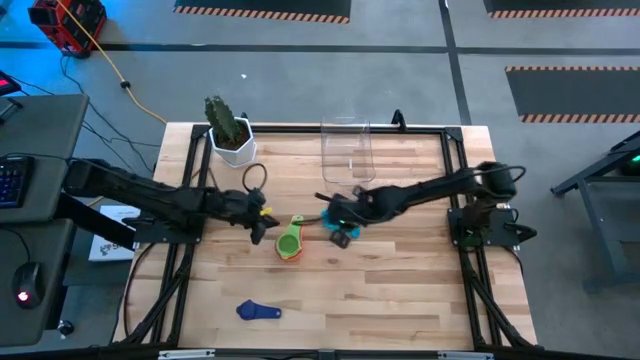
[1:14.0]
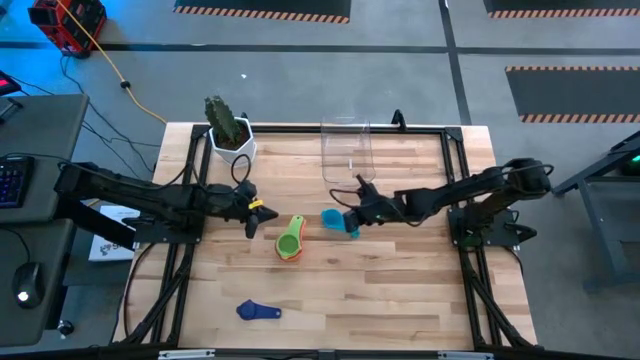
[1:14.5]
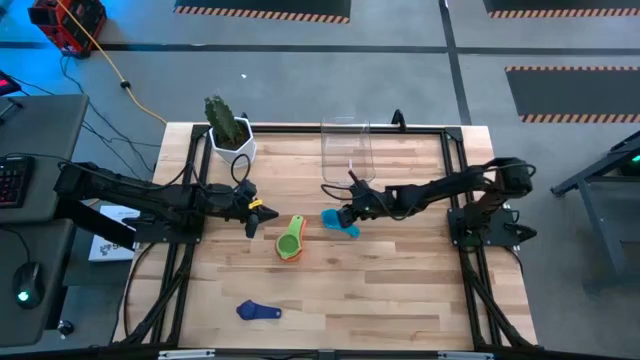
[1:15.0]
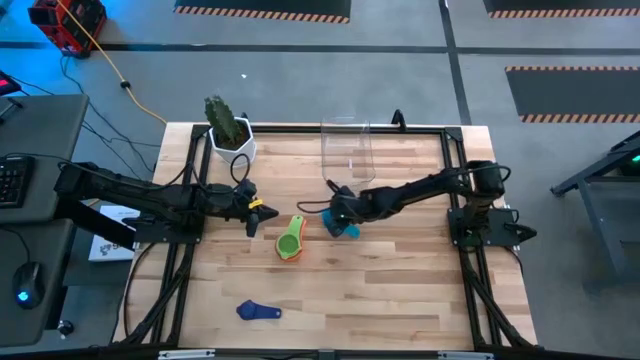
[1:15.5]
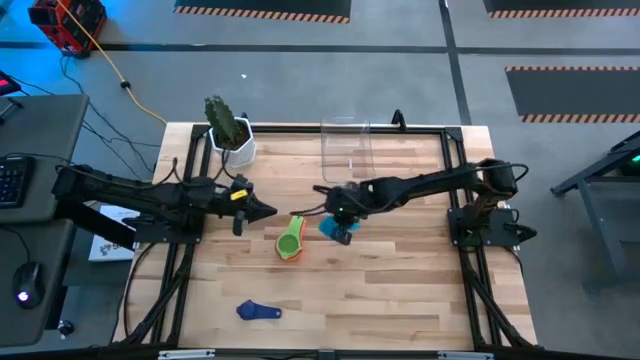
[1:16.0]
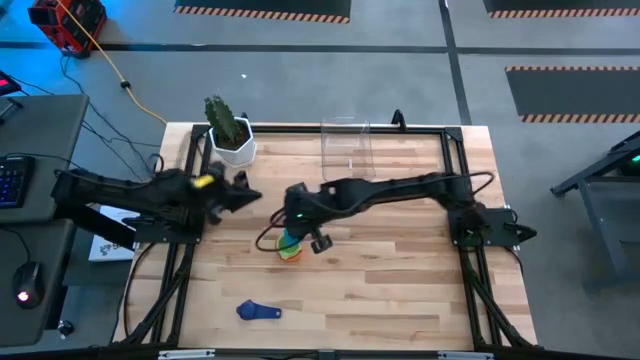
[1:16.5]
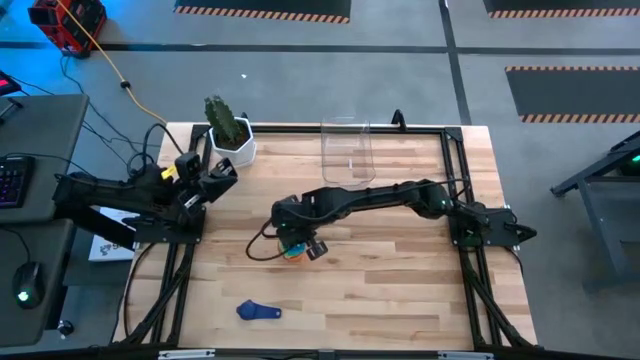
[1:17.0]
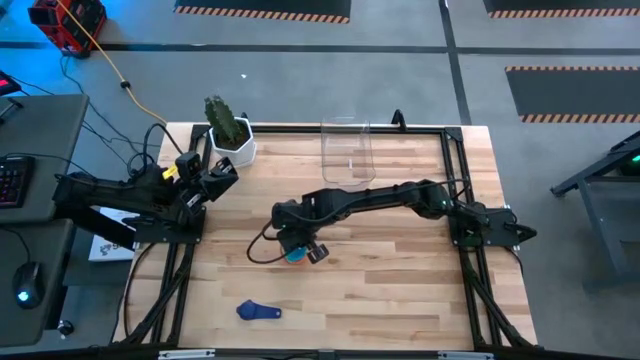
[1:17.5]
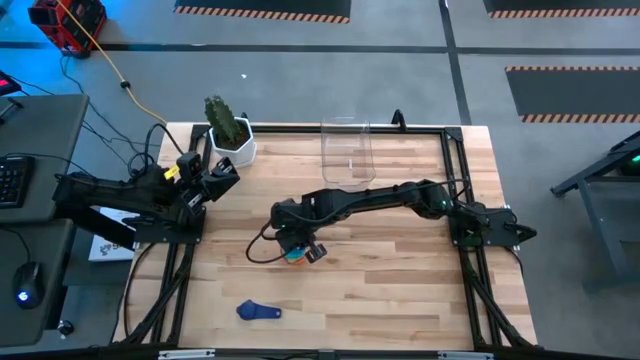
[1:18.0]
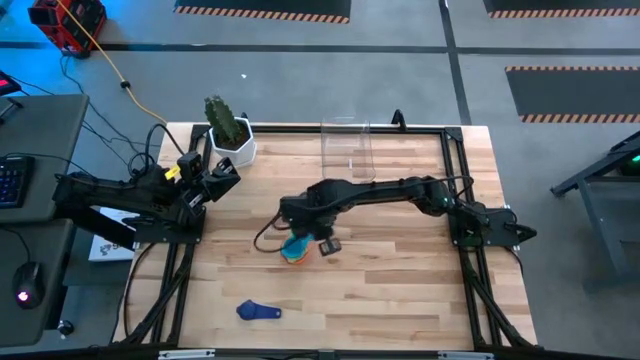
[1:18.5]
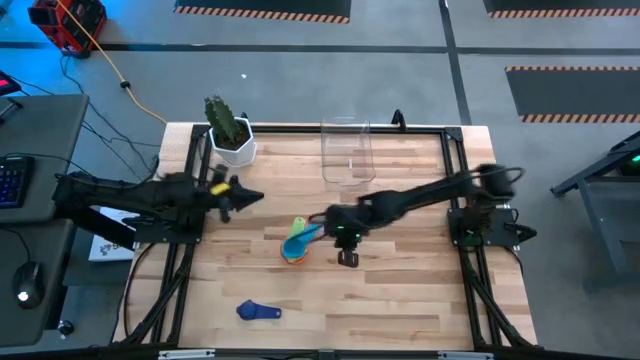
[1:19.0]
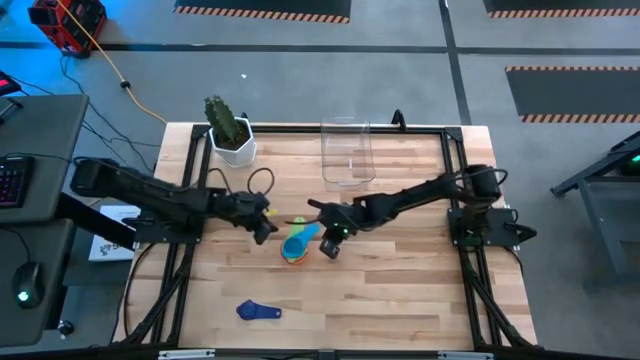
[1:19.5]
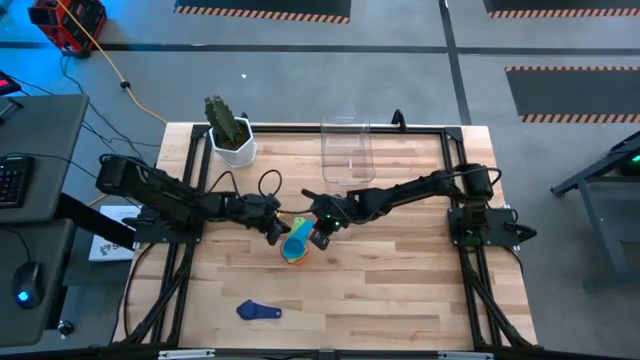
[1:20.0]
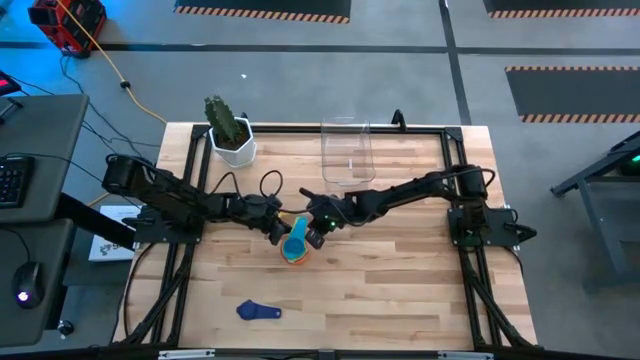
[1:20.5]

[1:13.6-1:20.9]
Task: Nest measuring cups in basket
Stack the light blue measuring cup on top of the green measuring cup

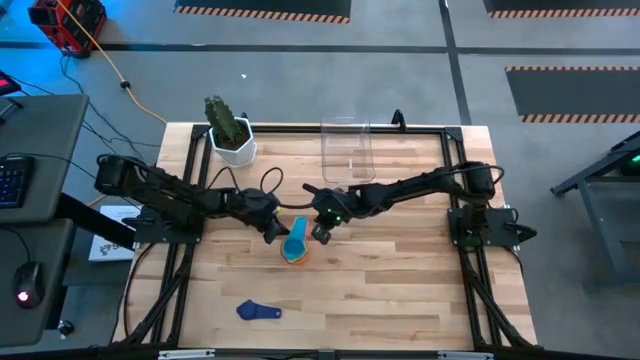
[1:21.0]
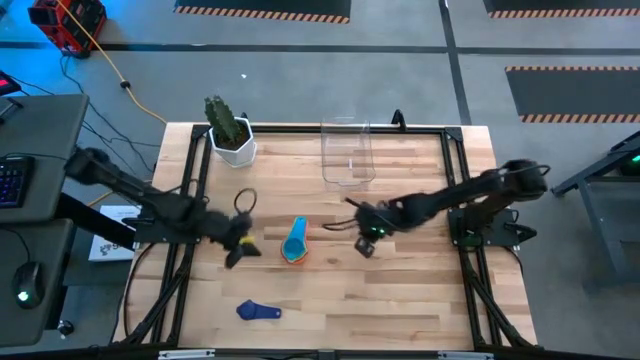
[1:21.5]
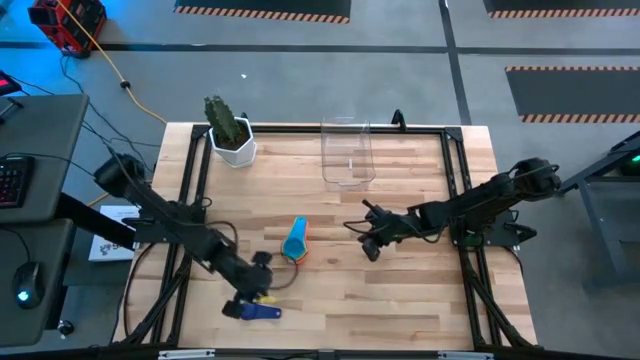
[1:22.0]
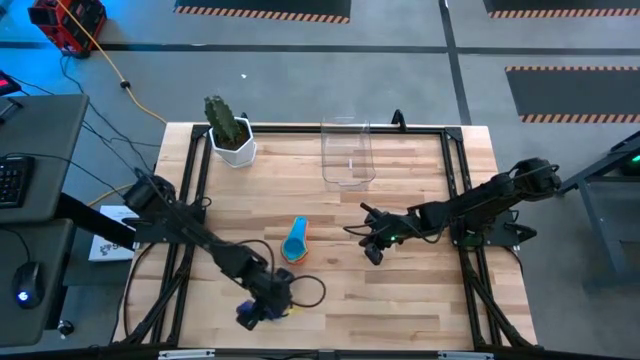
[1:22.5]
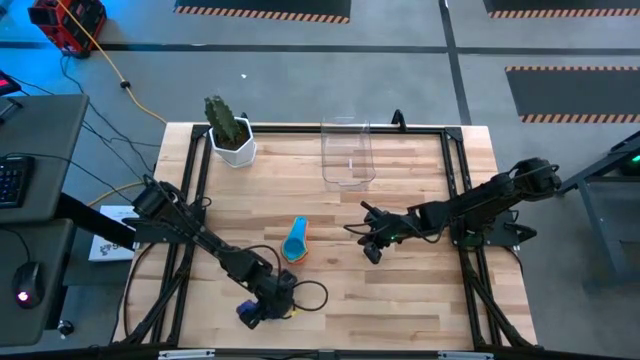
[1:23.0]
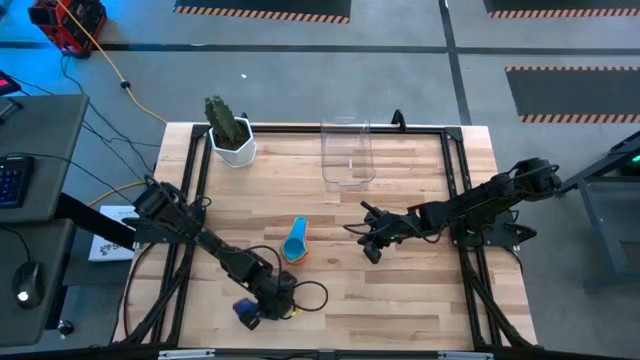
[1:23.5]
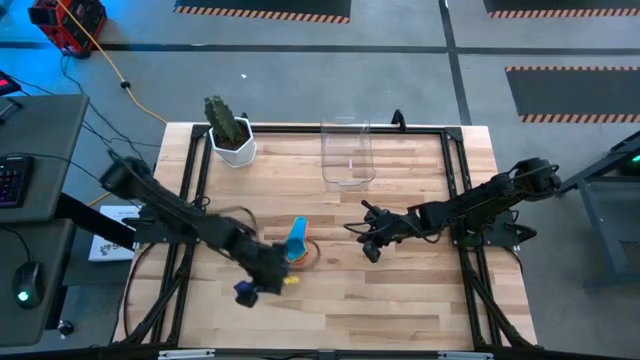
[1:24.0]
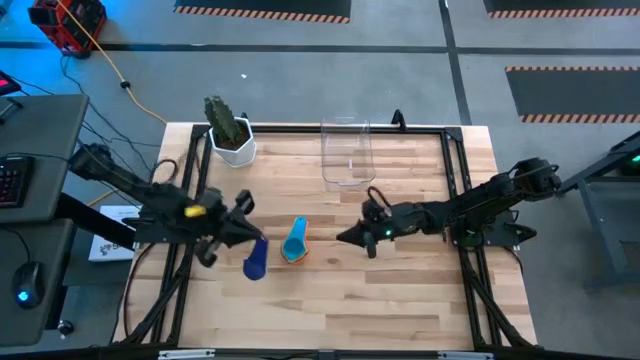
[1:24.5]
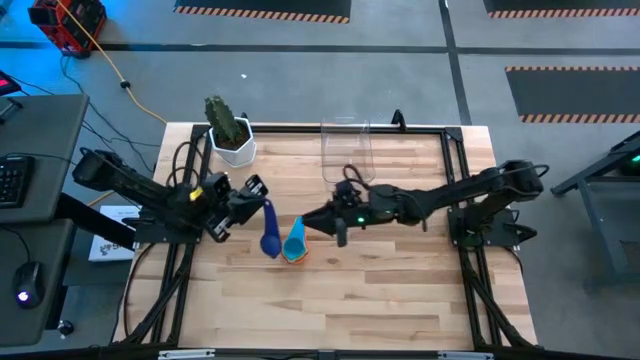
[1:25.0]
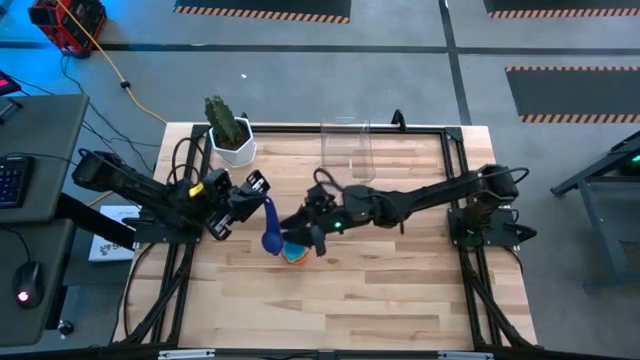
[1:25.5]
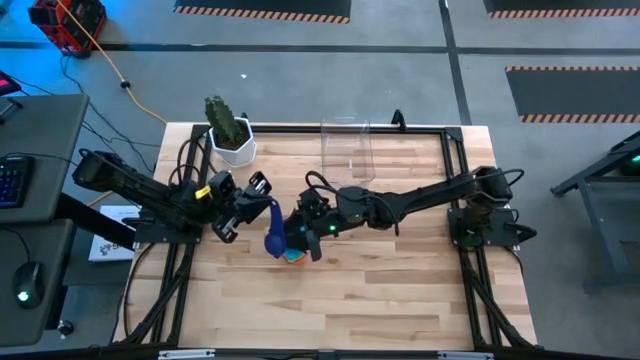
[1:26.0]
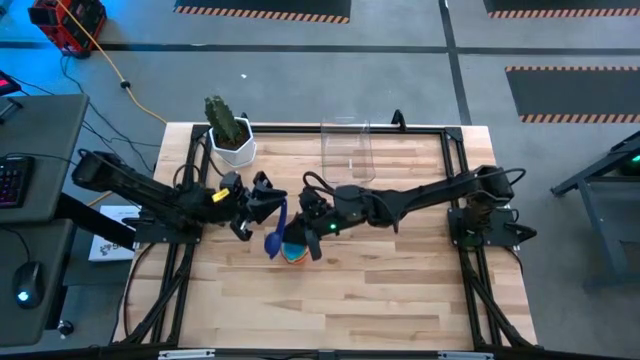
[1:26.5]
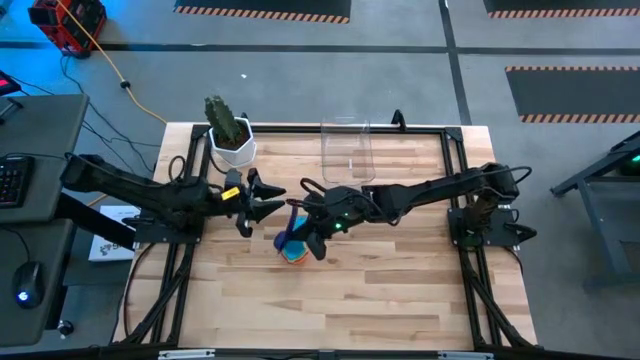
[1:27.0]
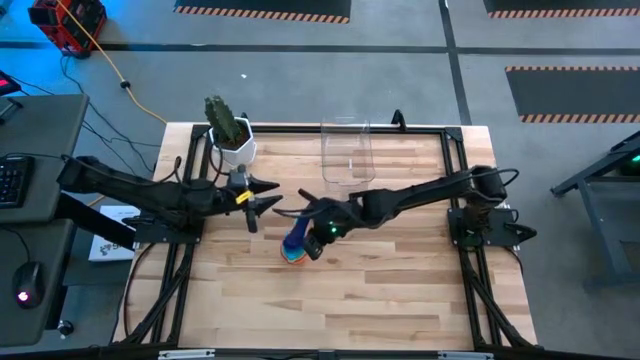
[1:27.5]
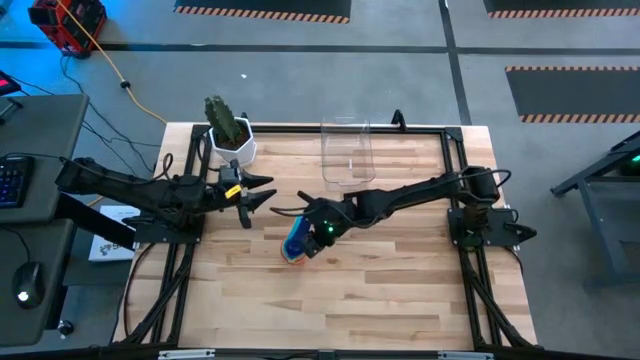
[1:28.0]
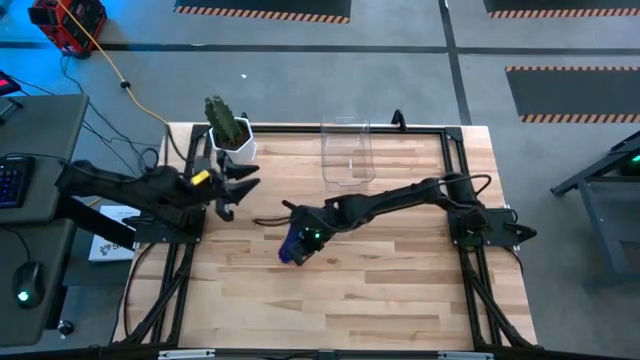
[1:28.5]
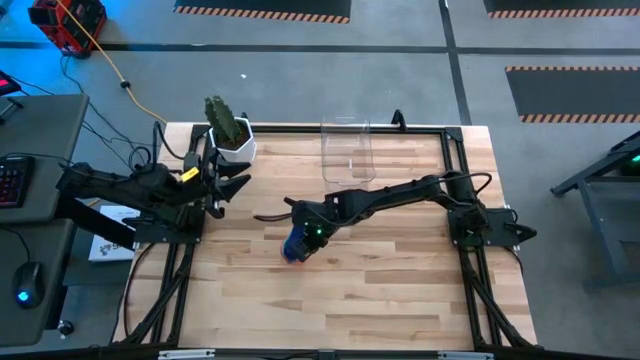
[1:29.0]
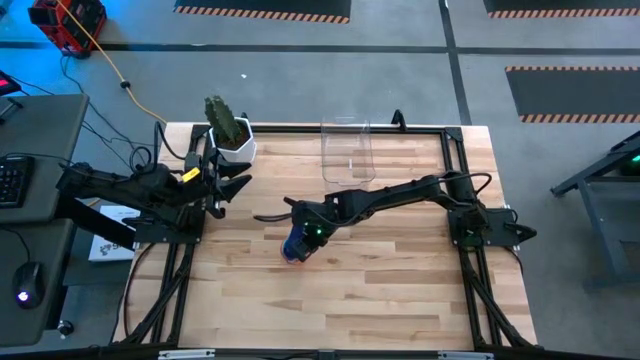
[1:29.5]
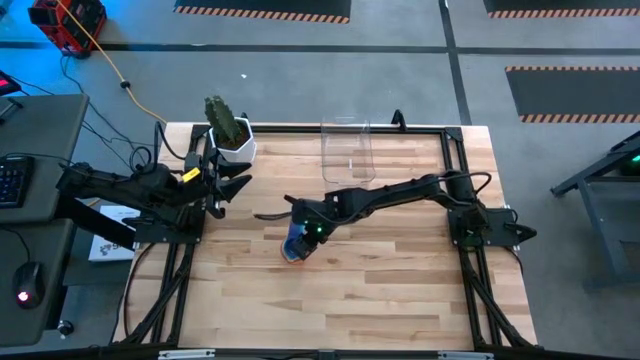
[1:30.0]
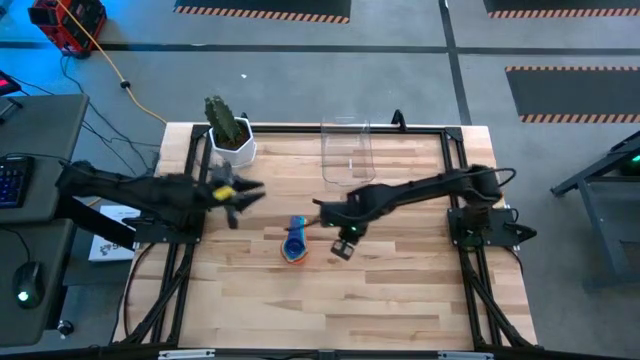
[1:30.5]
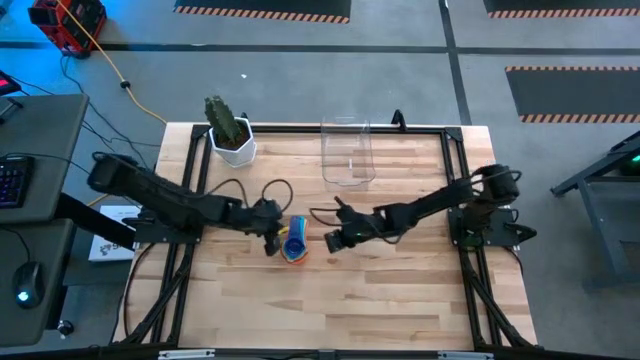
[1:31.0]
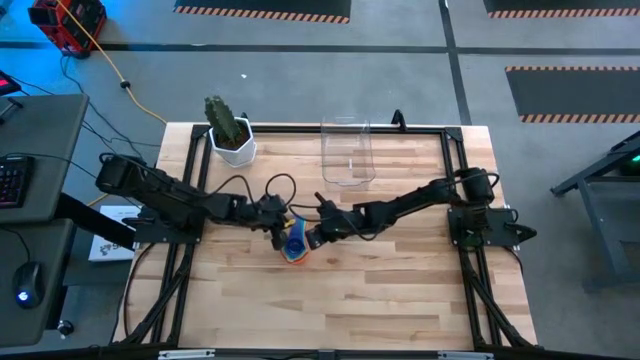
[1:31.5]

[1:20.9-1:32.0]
Stack the dark blue measuring cup on top of the light blue measuring cup
